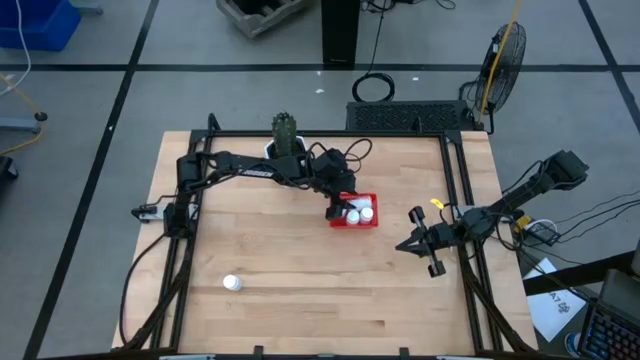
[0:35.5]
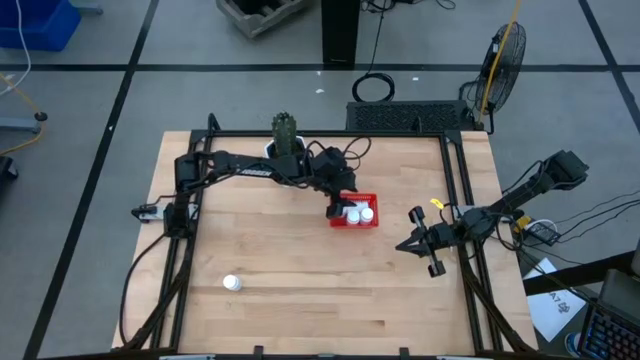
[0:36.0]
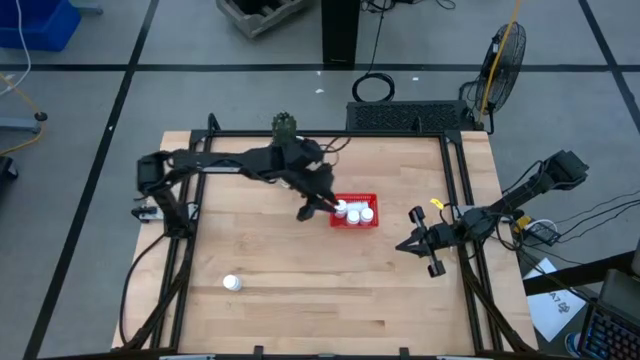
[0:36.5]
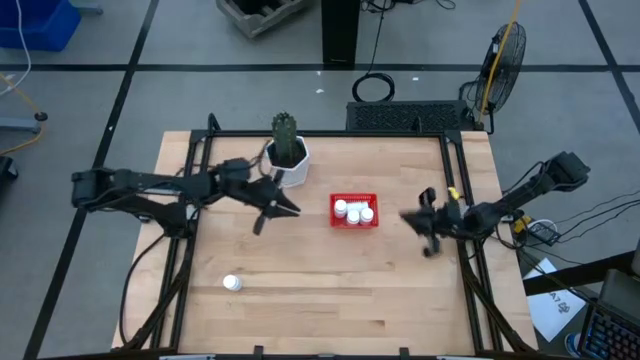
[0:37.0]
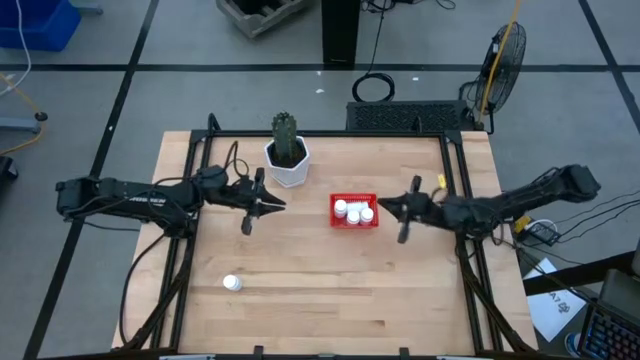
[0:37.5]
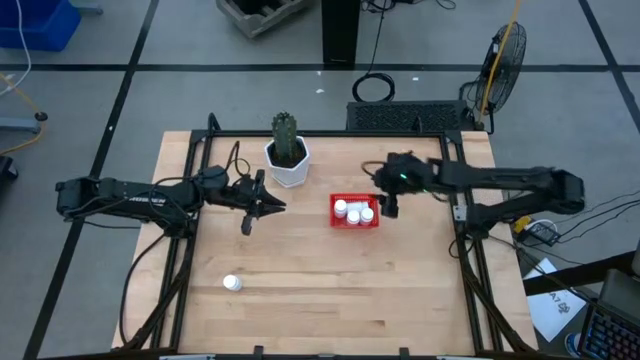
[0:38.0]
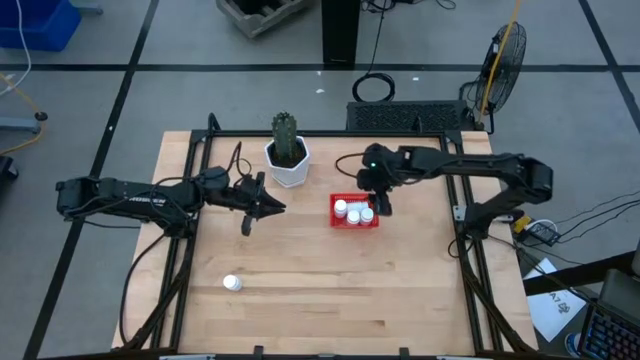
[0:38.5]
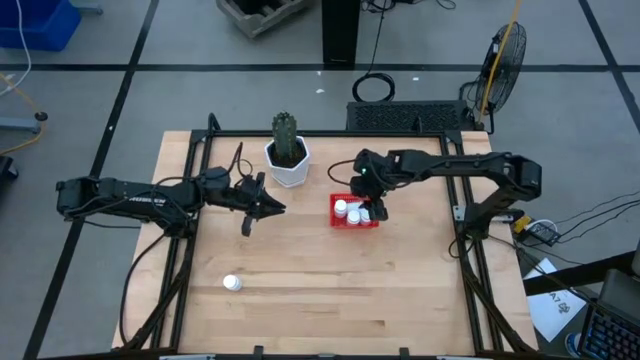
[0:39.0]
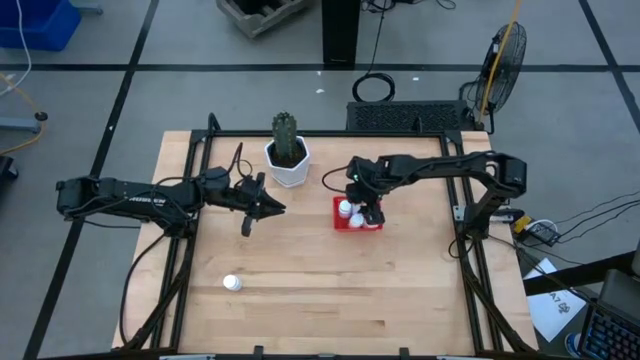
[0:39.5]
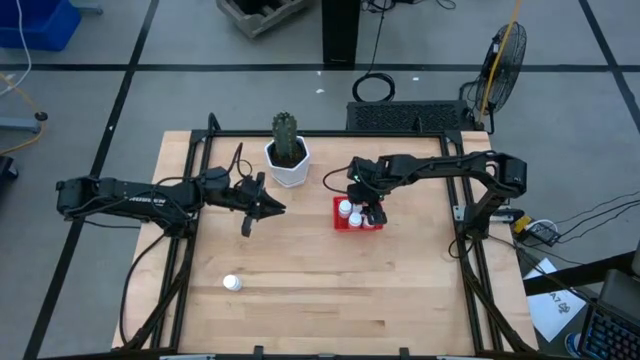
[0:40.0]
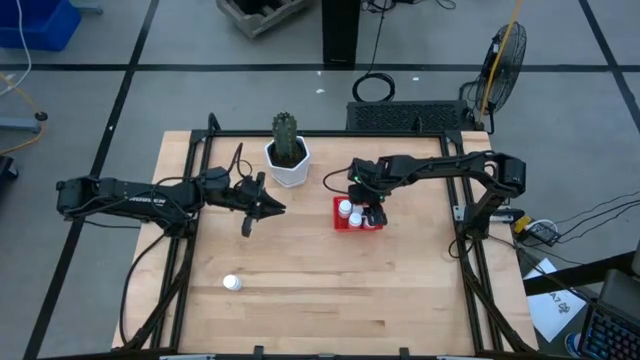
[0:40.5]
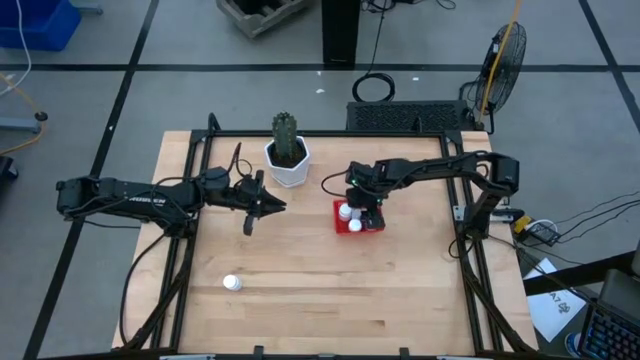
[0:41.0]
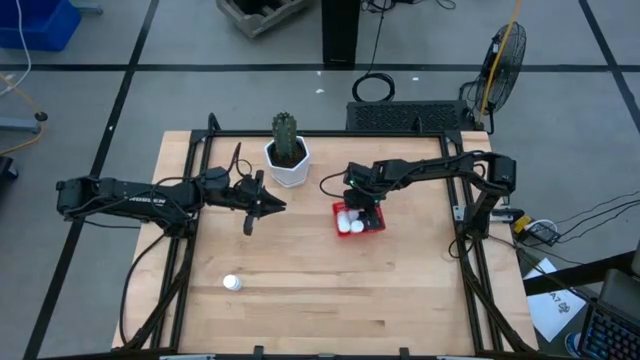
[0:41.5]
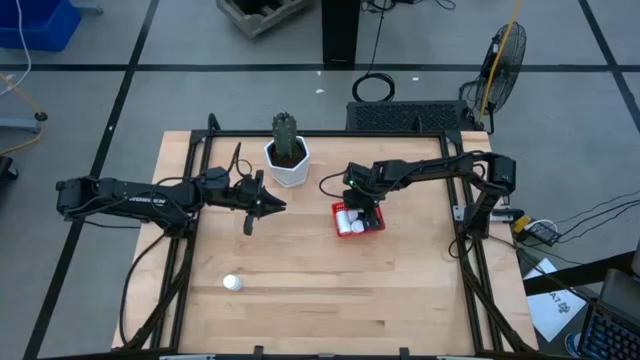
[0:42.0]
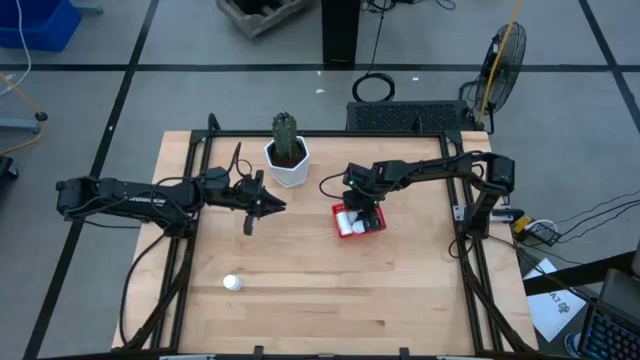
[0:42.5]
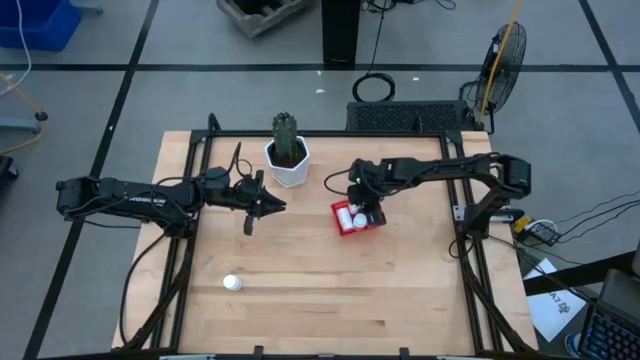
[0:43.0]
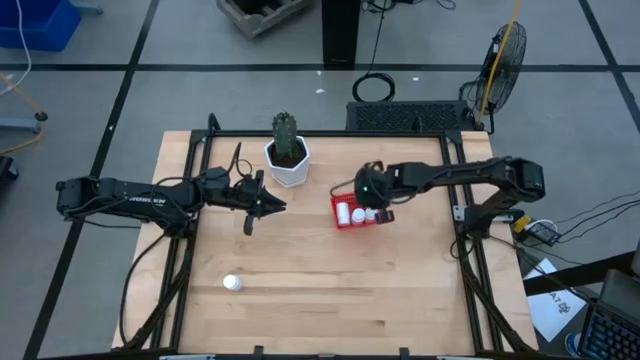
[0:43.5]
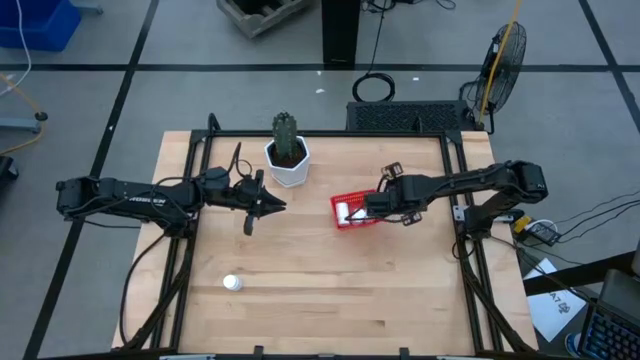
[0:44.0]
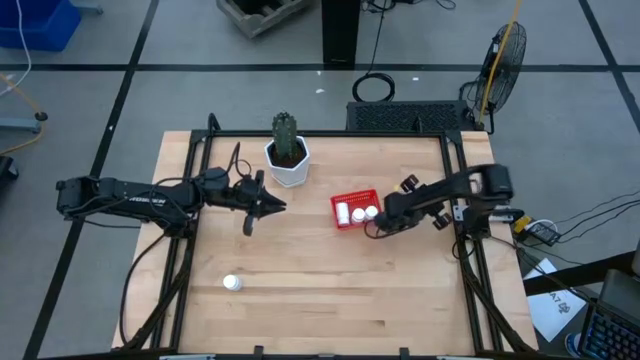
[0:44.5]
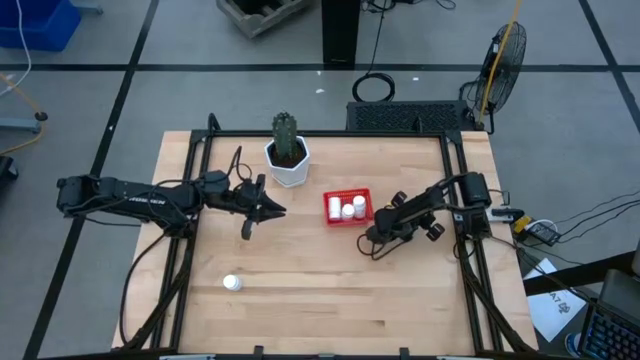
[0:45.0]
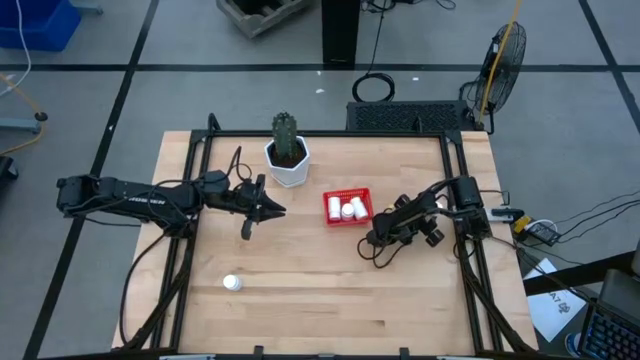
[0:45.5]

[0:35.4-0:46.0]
Task: Pick and place pill bottles into a basket
Remove the white pill bottle from the red bin

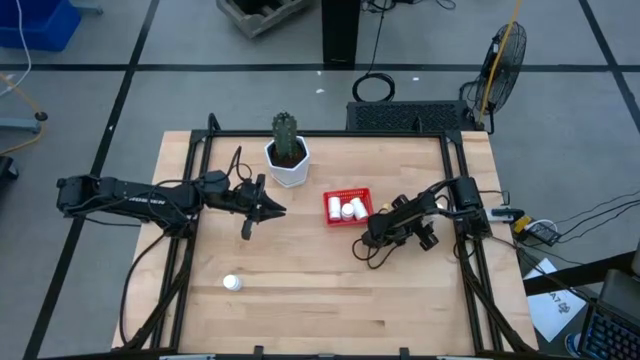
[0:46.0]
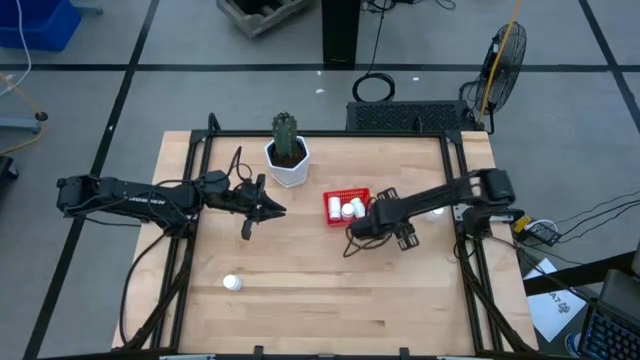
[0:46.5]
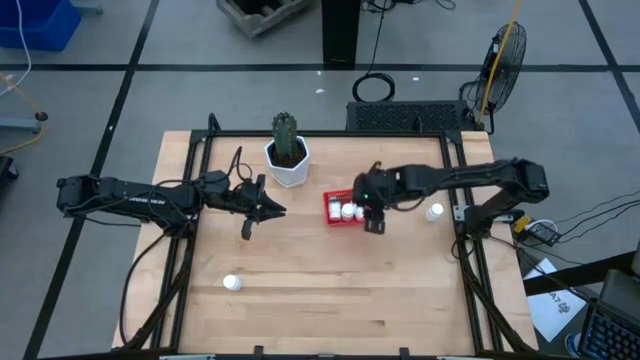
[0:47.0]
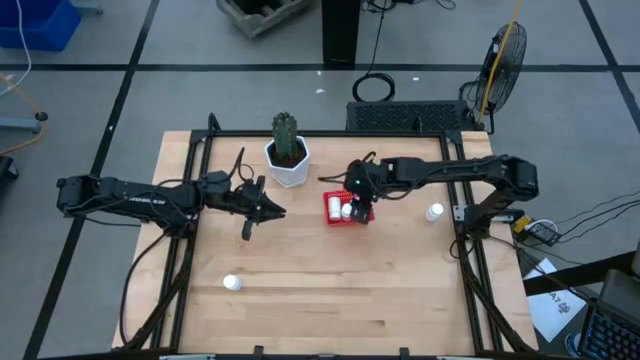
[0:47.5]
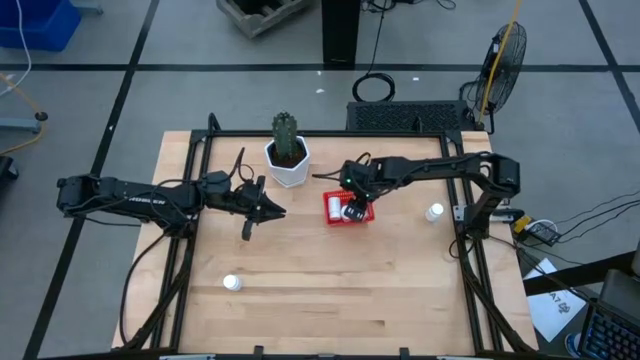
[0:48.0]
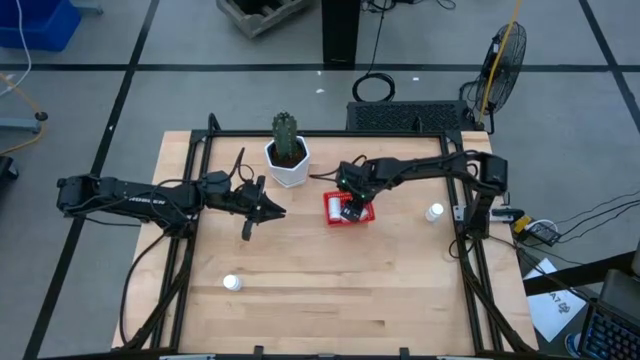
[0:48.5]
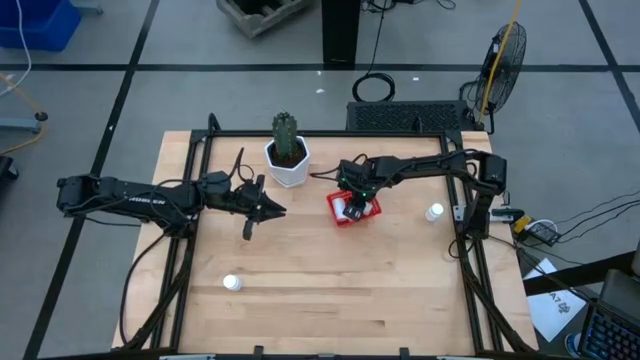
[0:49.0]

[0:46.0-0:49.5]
Remove the white pill bottle from the red bin

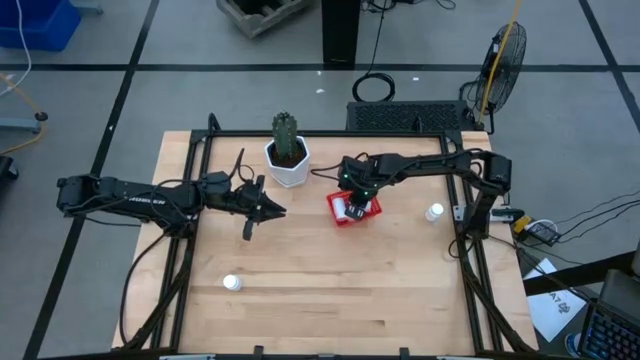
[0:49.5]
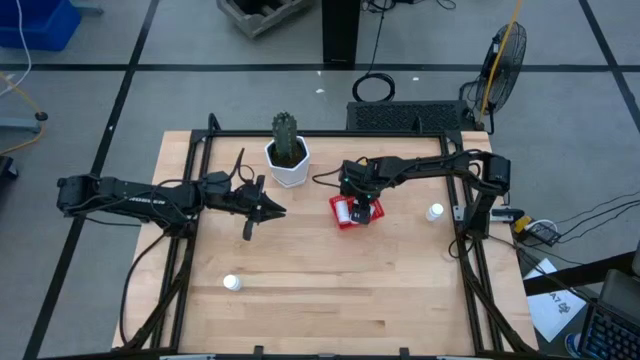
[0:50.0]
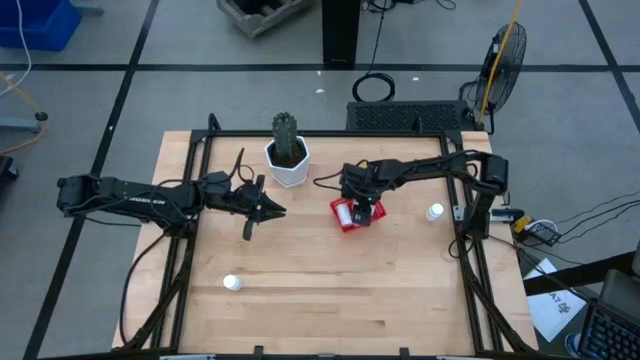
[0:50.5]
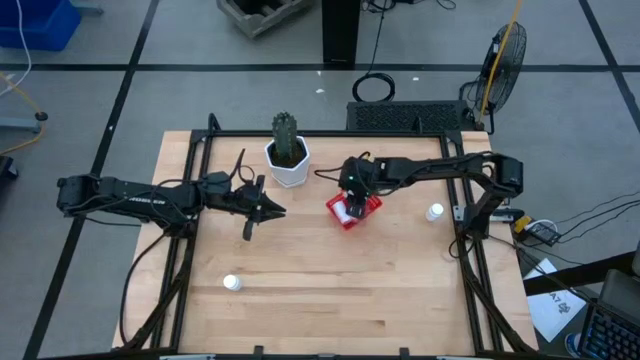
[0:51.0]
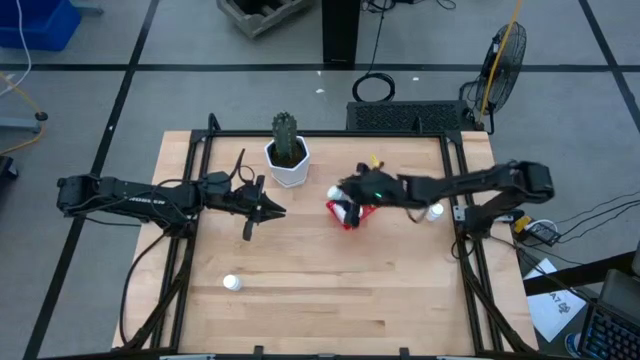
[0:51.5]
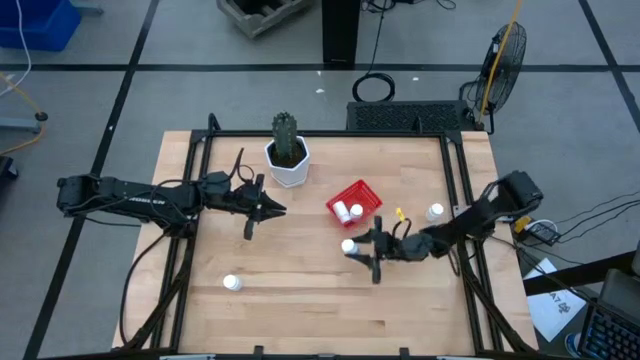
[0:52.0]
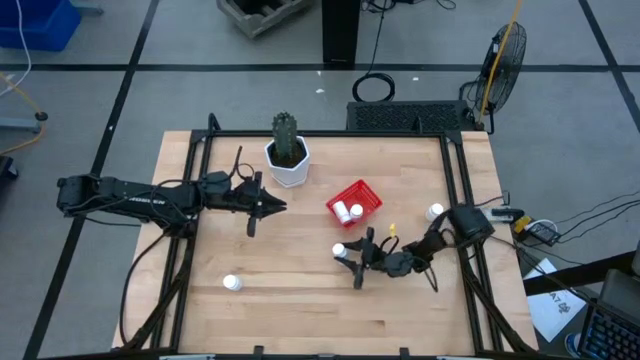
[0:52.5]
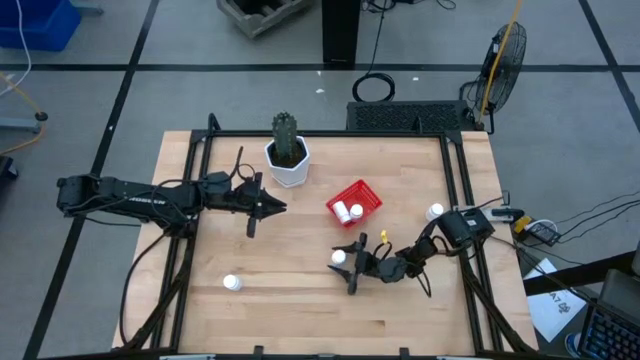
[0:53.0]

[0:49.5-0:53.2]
Remove the white pill bottle from the red bin

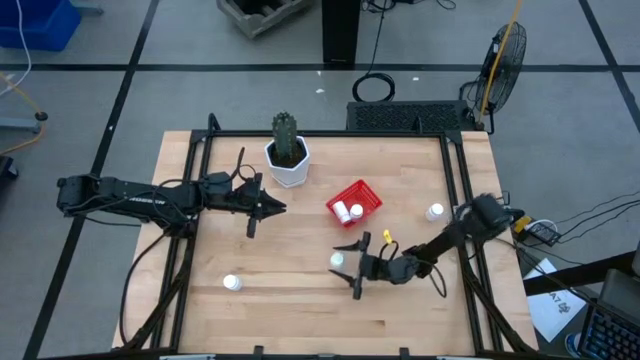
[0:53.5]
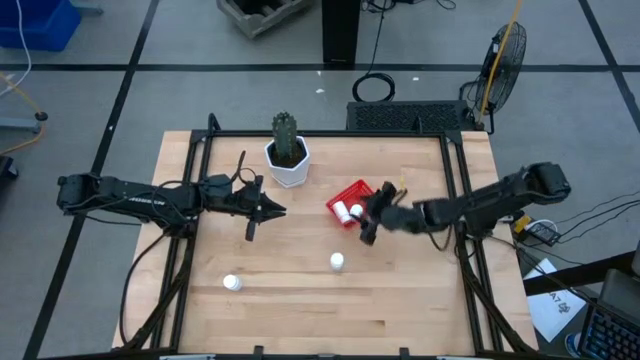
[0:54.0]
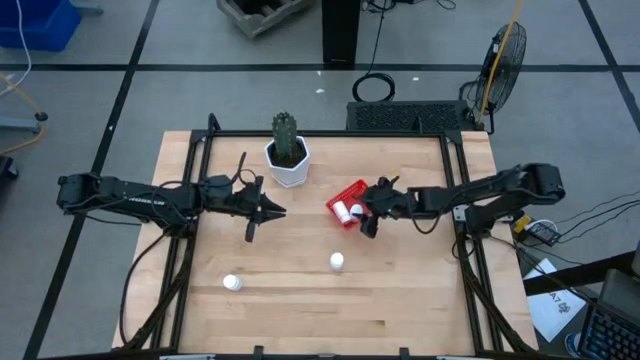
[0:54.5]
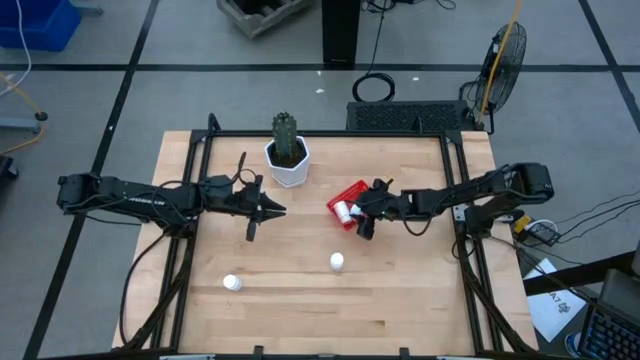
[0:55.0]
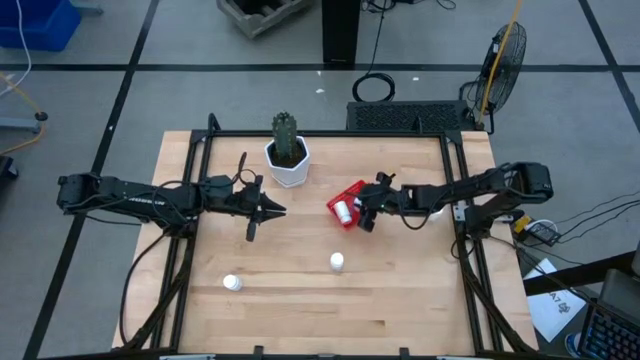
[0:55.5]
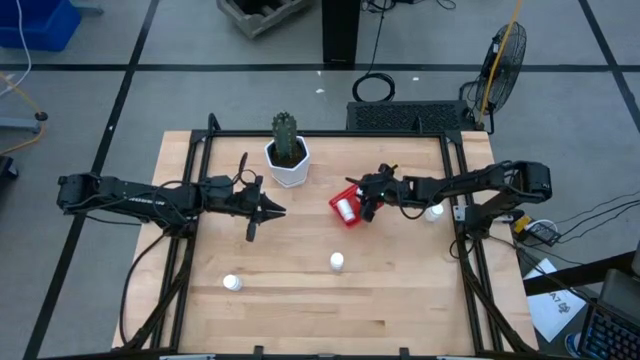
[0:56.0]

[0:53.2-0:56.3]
Adjust the white pill bottle in the red bin to maximize space
